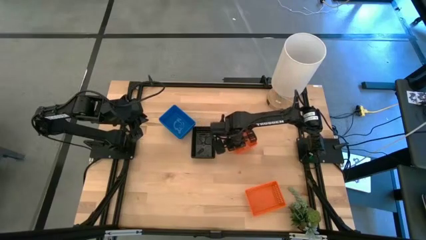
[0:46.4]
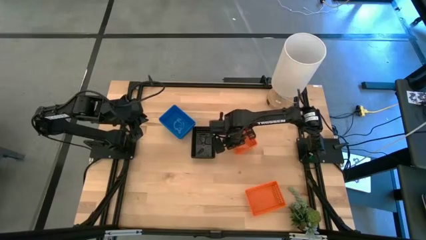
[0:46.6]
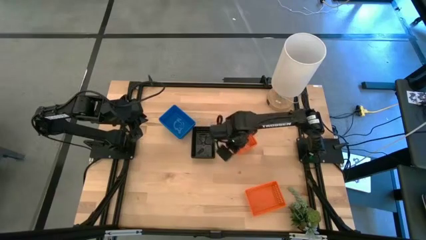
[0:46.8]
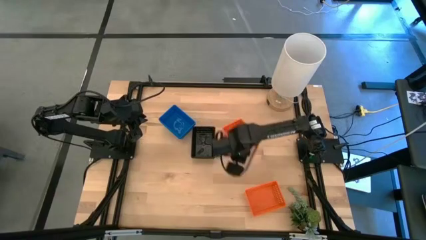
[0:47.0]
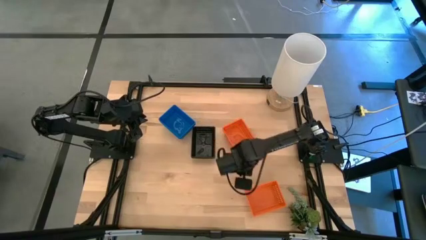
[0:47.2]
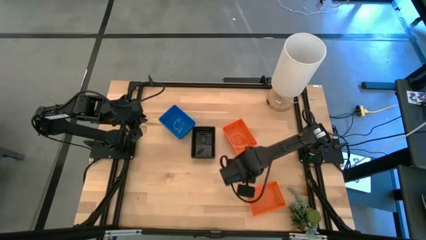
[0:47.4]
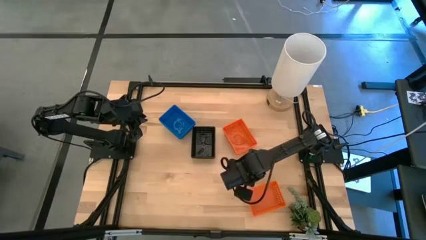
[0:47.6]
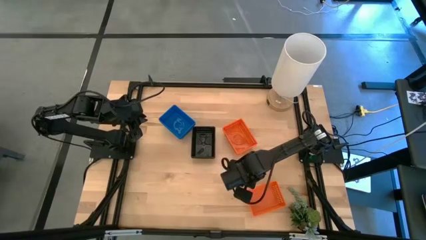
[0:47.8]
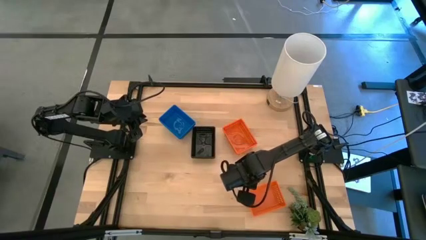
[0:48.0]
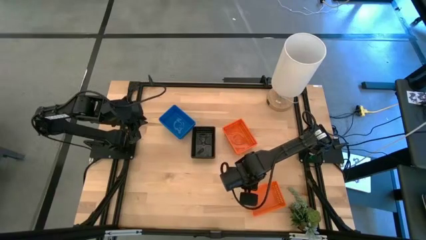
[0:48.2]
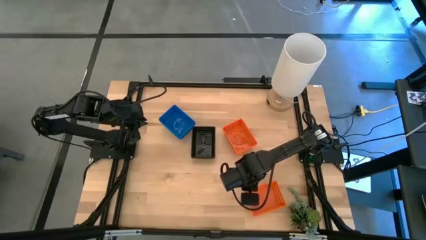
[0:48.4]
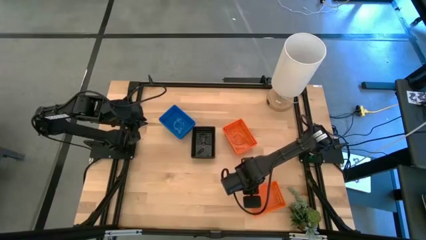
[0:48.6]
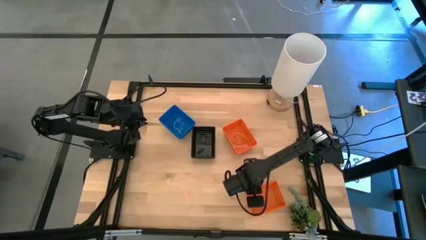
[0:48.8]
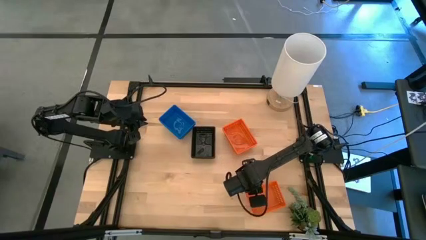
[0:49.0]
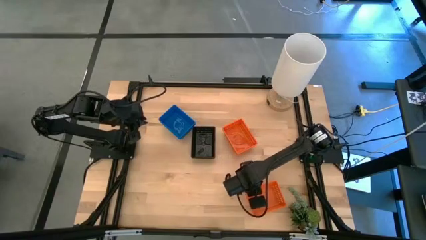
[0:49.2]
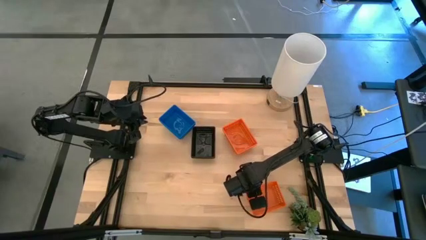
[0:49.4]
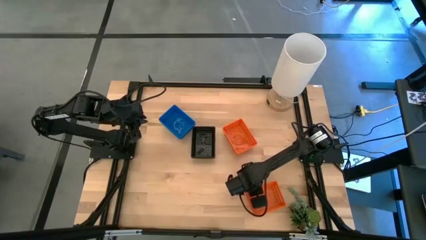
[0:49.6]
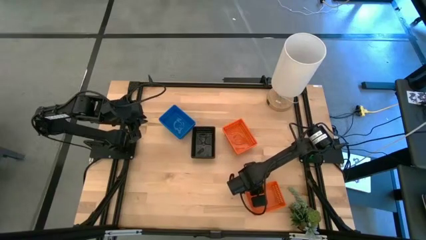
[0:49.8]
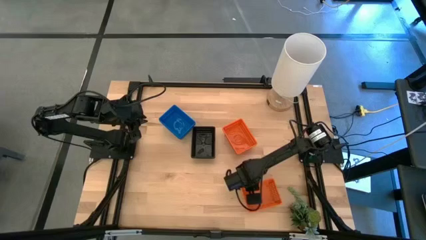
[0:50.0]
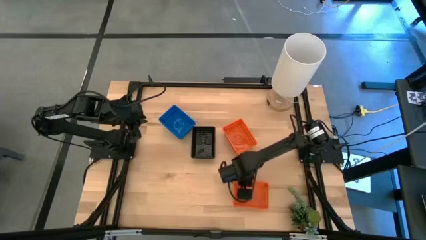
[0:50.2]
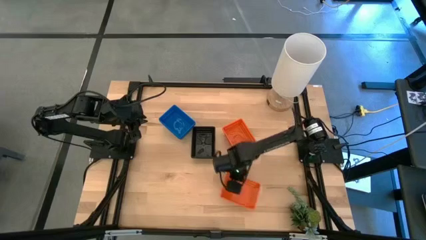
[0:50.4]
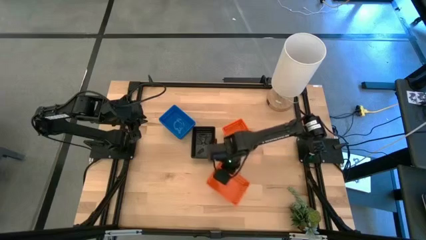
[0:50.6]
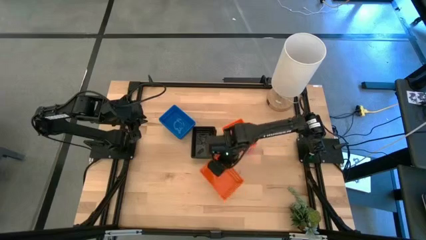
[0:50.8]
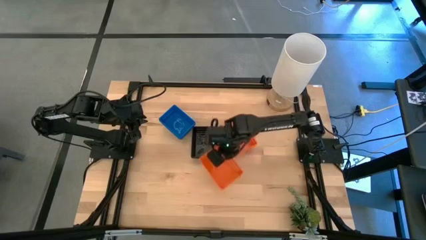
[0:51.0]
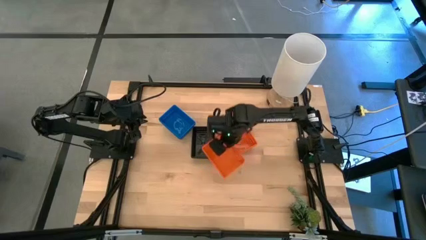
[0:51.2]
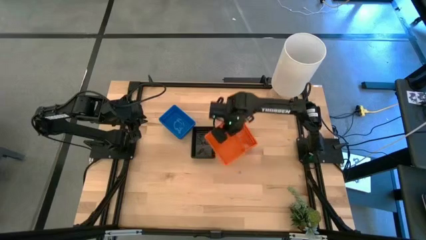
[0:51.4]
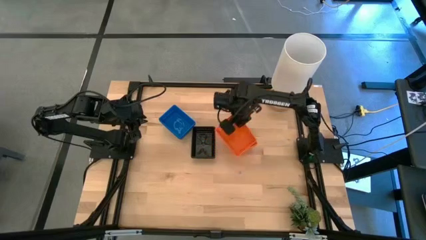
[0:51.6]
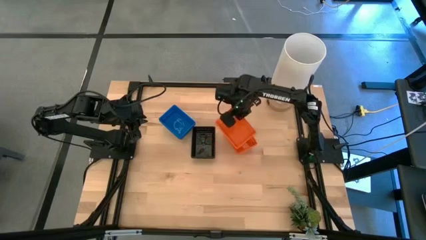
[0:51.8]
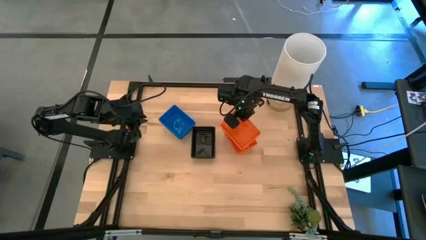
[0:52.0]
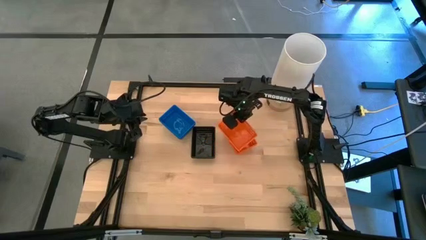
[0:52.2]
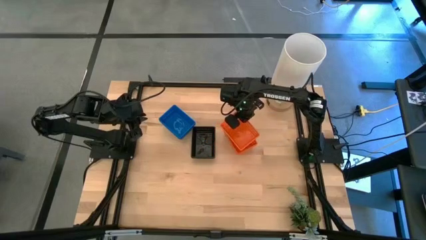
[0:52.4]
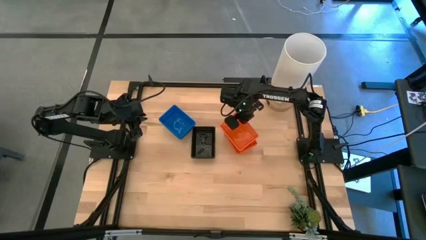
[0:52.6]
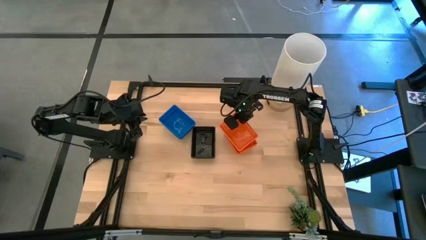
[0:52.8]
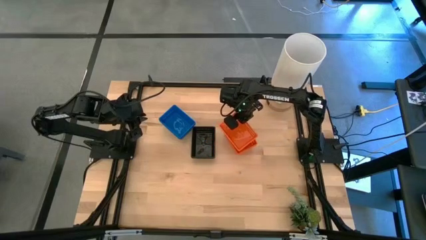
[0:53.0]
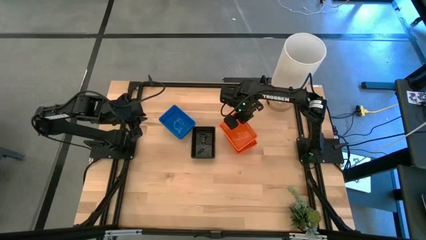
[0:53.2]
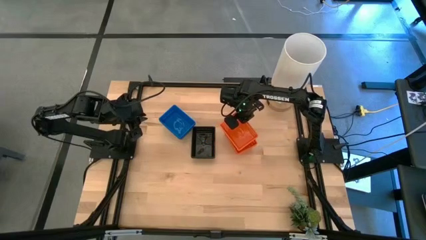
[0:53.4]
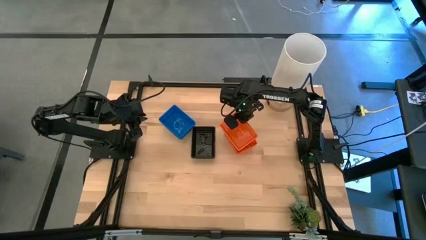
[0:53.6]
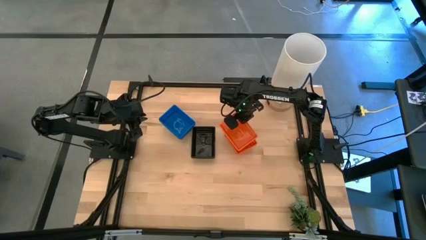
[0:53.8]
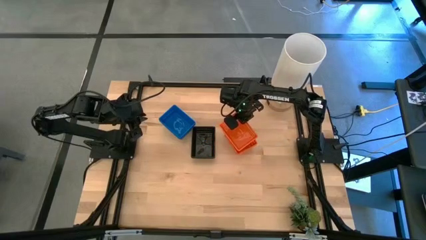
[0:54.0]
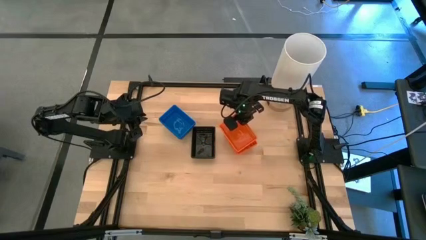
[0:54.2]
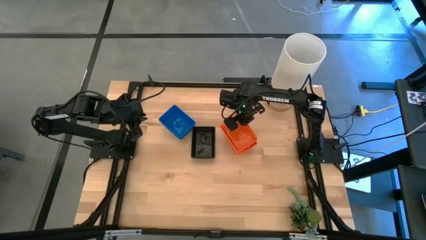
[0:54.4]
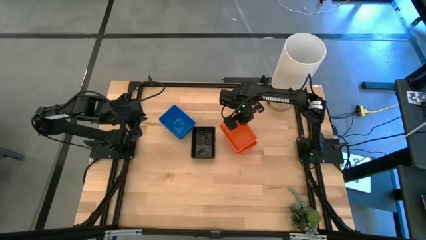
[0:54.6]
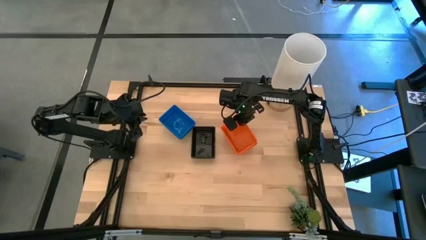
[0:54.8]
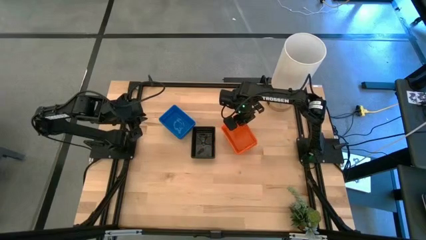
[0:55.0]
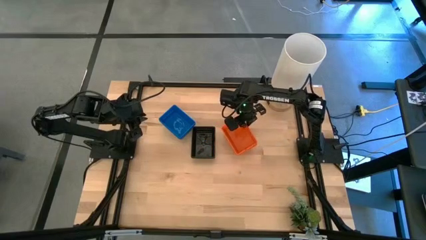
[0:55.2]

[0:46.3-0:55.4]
Stack the bottom orange bin on the top orange bin

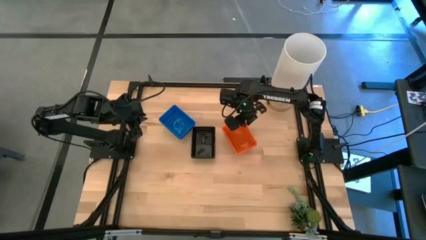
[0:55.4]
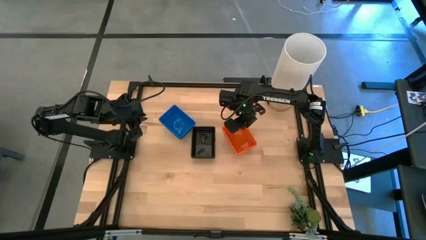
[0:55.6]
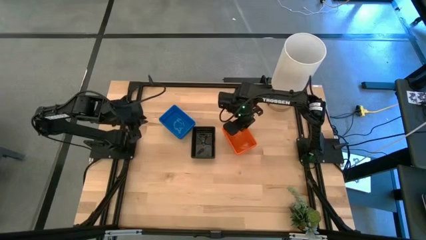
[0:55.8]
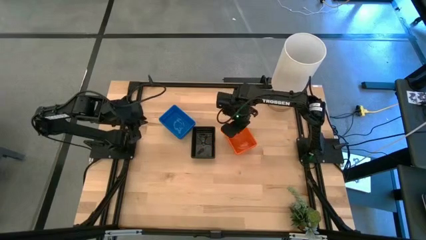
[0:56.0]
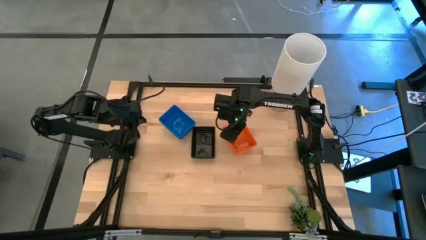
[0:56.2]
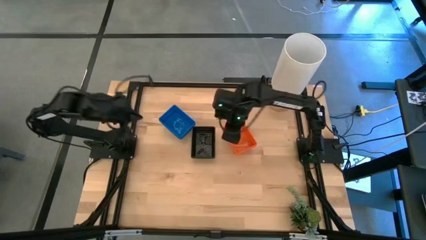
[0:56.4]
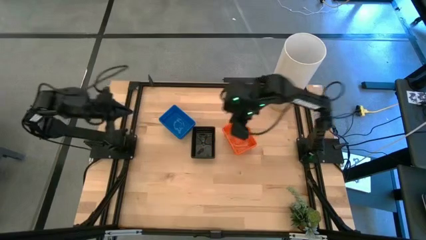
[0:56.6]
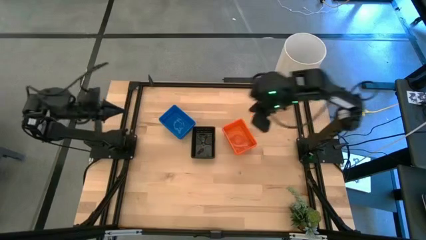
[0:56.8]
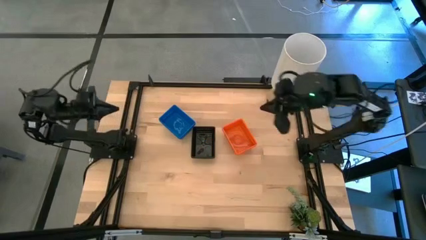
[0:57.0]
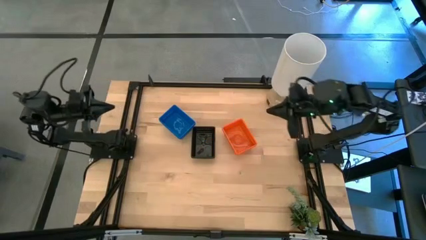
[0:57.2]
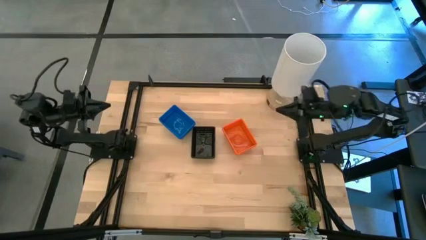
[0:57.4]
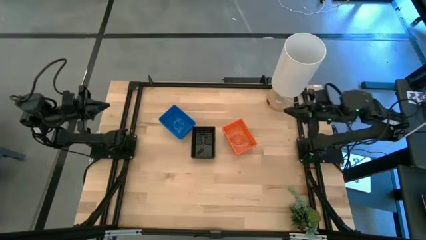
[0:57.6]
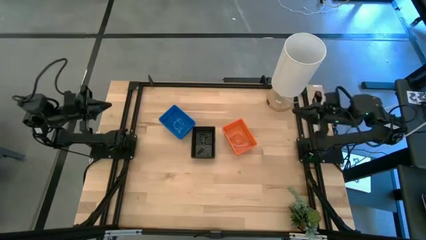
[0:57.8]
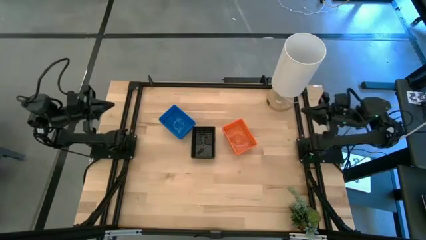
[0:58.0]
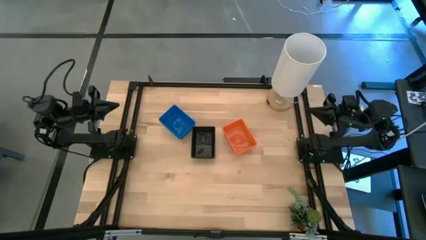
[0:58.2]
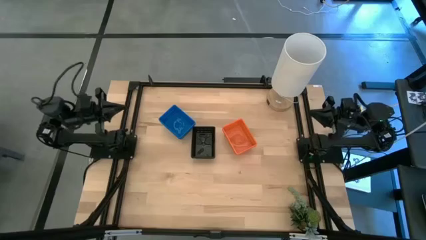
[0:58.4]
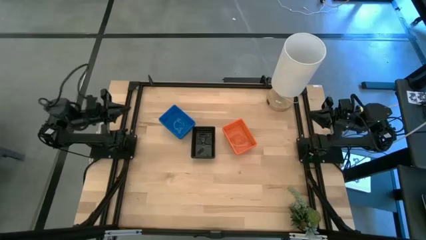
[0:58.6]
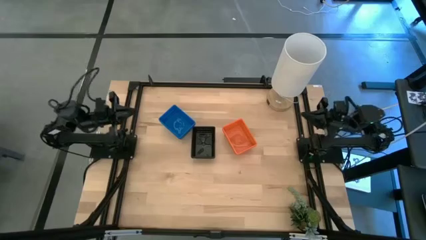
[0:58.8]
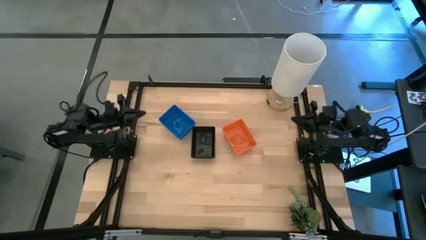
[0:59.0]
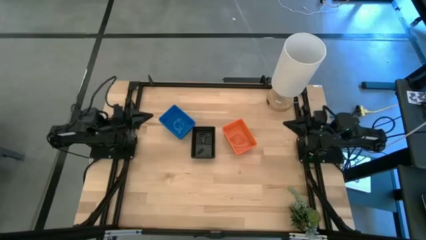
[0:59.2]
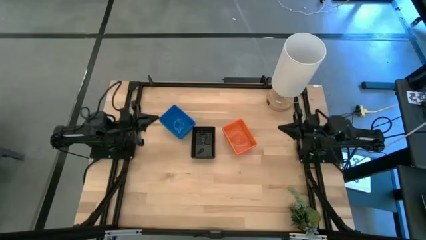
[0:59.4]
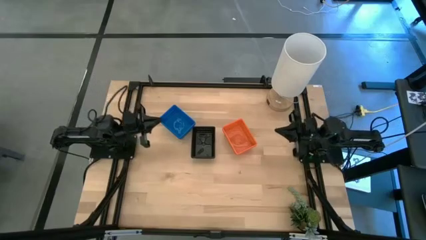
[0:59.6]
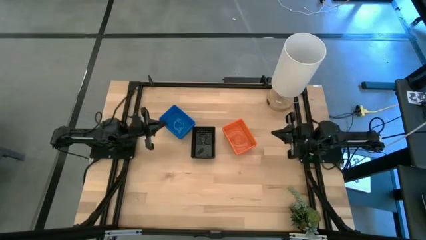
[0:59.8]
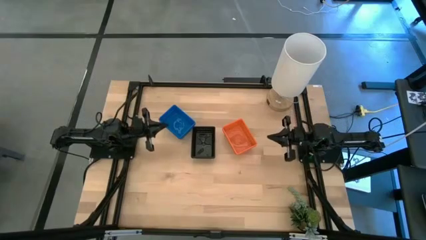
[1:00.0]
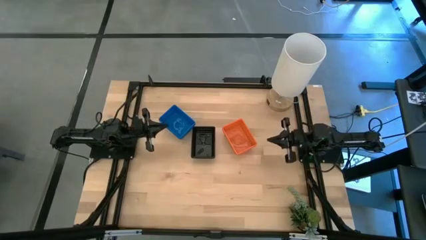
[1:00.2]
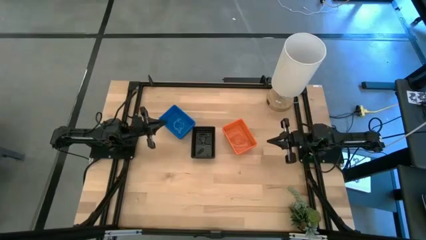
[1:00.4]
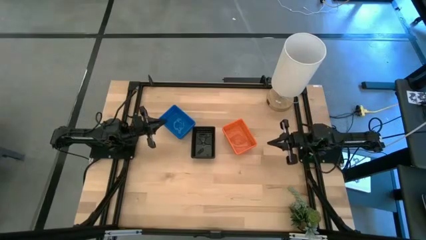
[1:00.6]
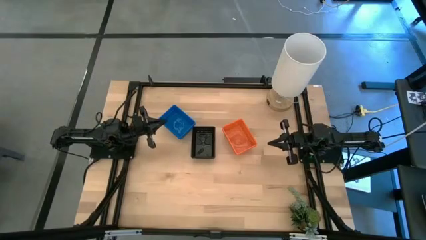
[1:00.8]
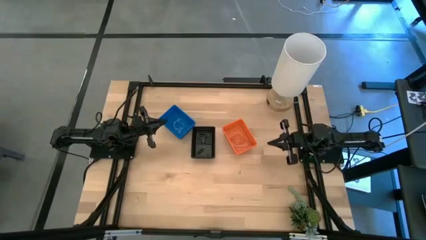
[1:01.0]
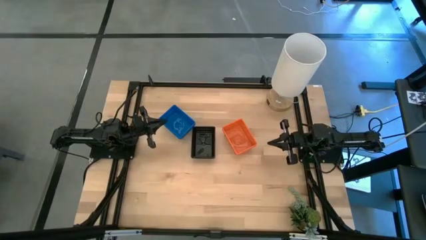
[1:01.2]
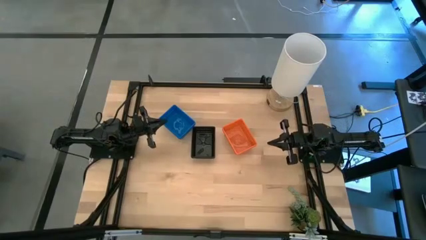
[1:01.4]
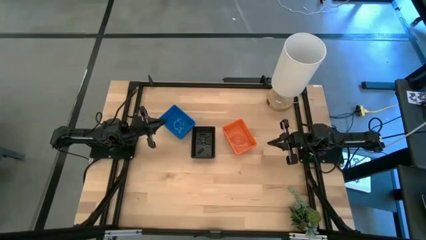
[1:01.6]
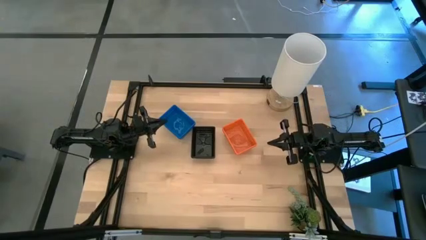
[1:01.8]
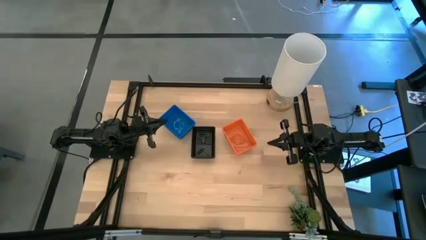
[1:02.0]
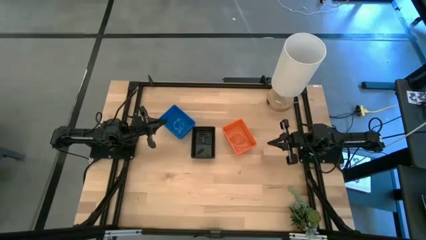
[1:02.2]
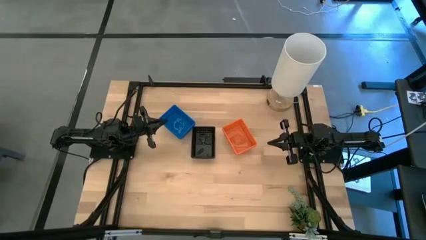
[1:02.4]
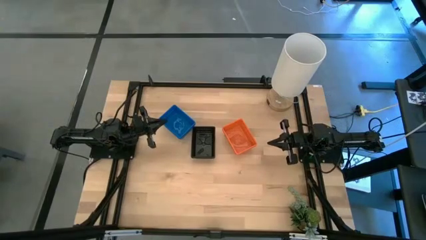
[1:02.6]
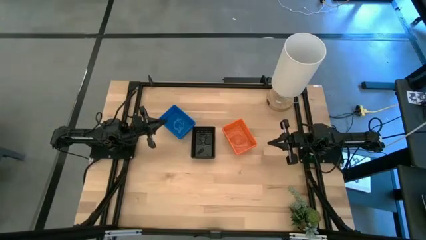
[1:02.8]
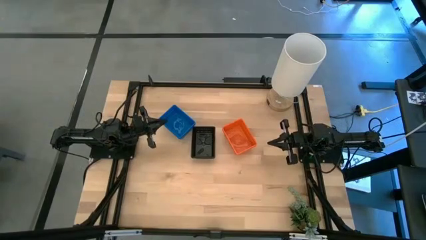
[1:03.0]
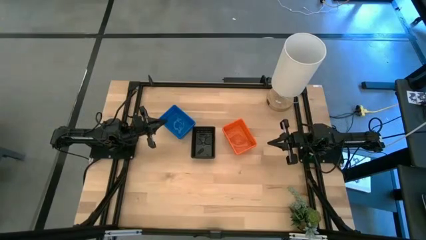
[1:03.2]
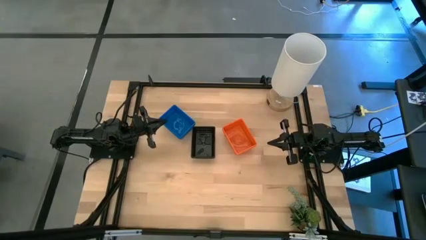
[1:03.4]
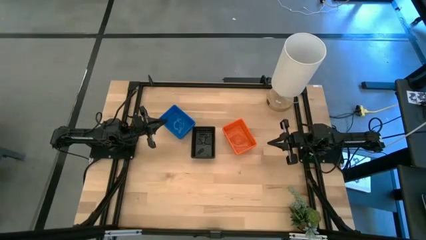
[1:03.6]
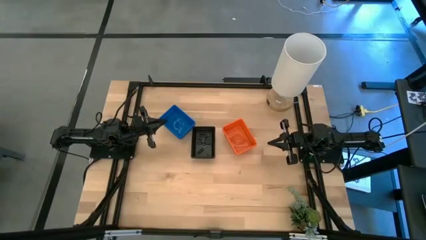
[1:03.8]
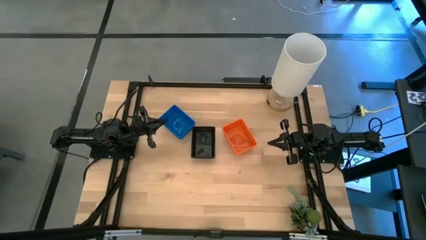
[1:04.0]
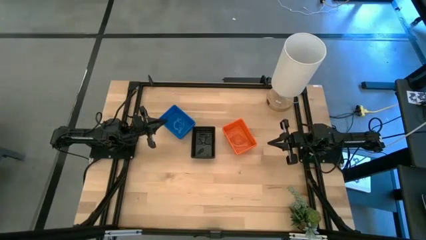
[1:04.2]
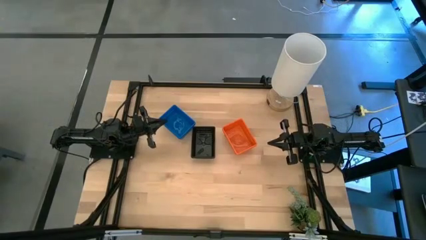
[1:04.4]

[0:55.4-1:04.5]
Return to Home Position
